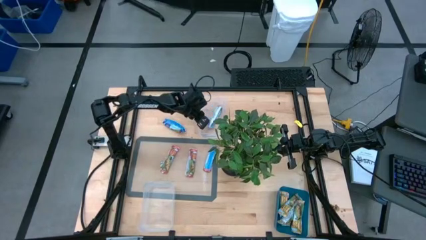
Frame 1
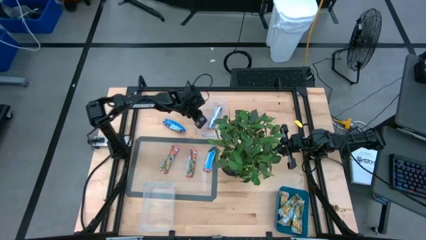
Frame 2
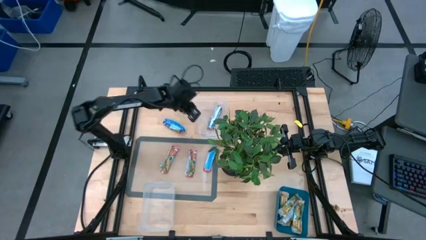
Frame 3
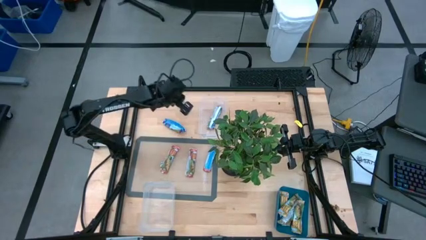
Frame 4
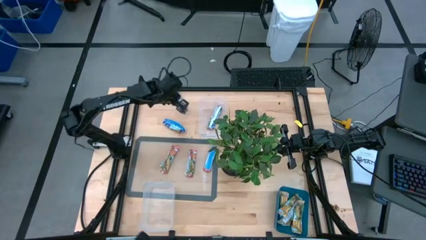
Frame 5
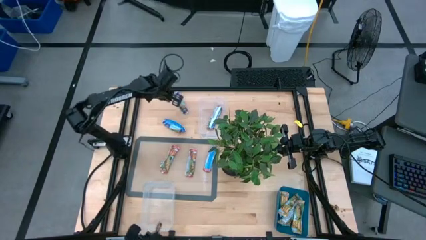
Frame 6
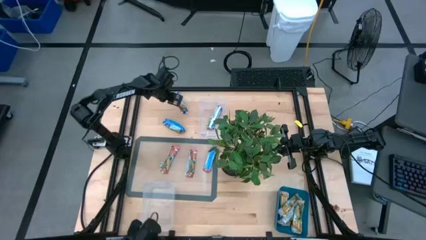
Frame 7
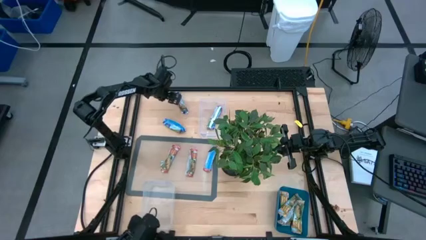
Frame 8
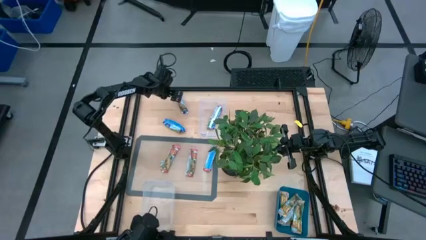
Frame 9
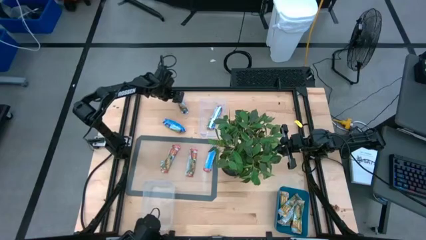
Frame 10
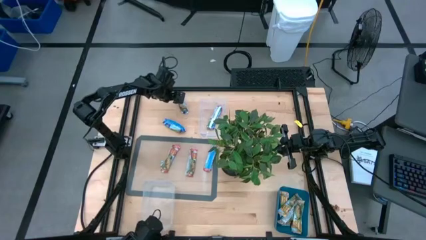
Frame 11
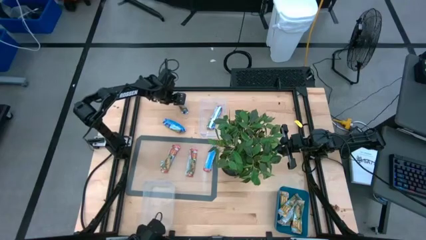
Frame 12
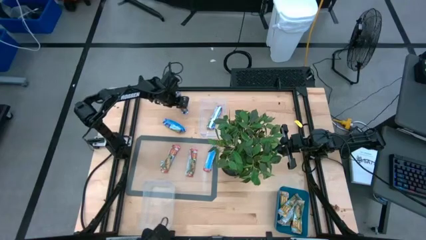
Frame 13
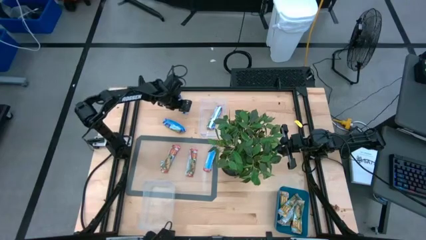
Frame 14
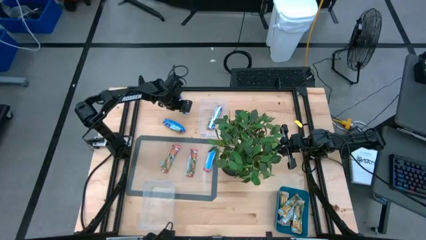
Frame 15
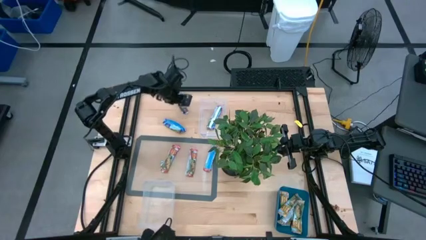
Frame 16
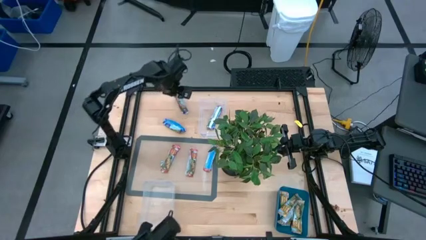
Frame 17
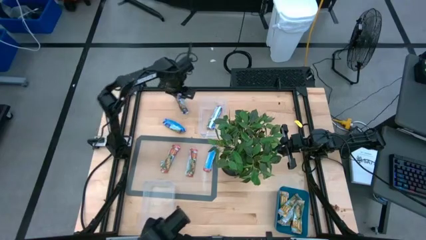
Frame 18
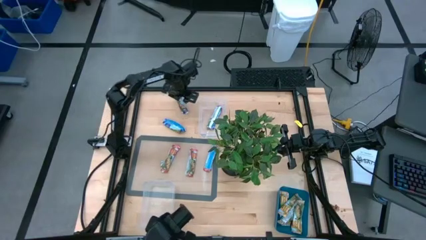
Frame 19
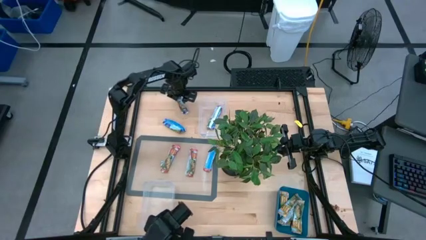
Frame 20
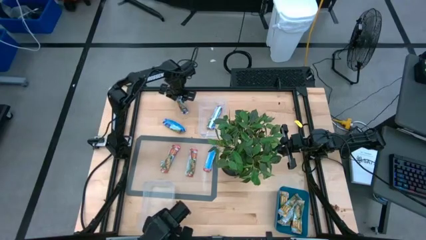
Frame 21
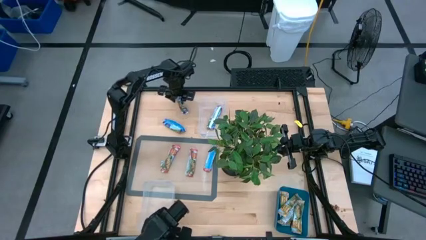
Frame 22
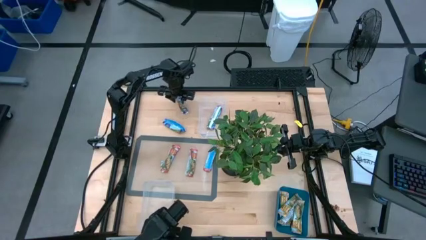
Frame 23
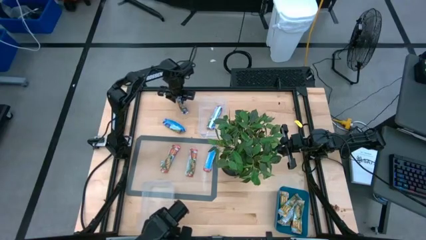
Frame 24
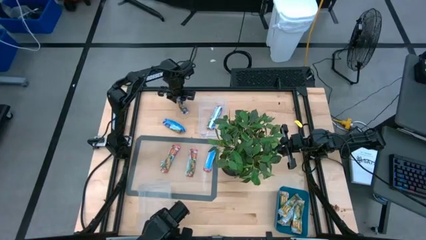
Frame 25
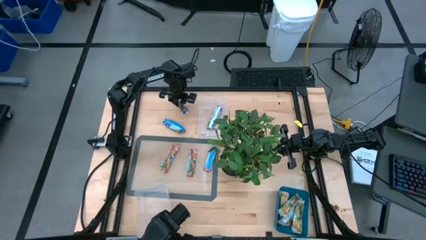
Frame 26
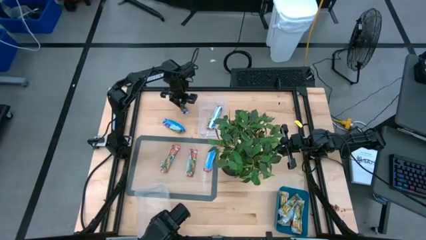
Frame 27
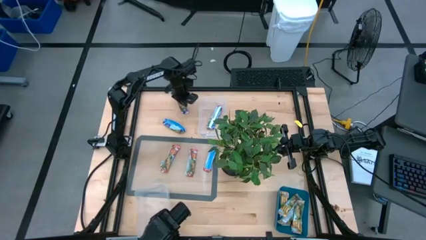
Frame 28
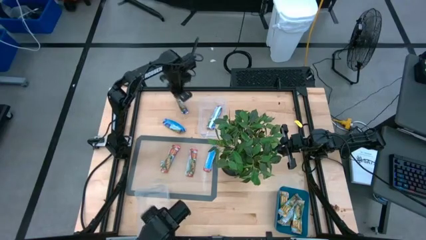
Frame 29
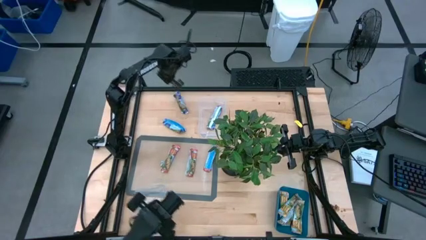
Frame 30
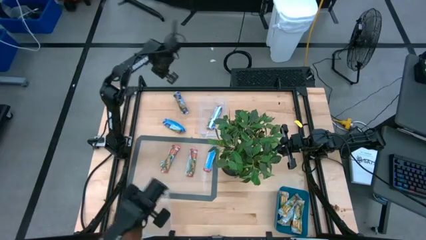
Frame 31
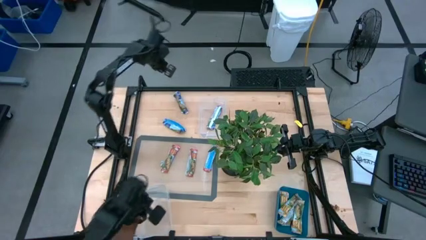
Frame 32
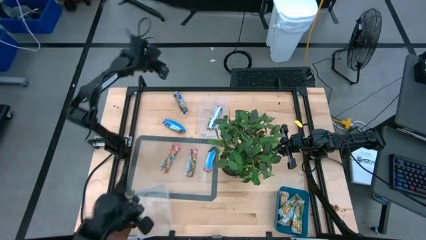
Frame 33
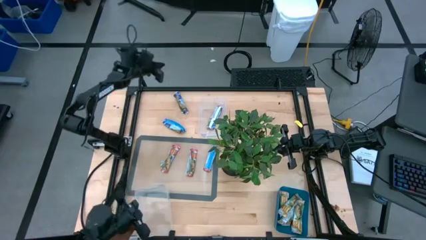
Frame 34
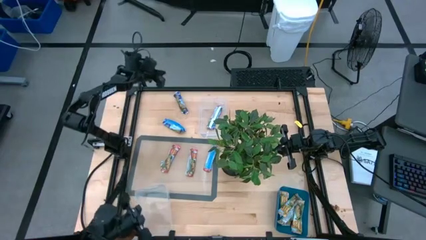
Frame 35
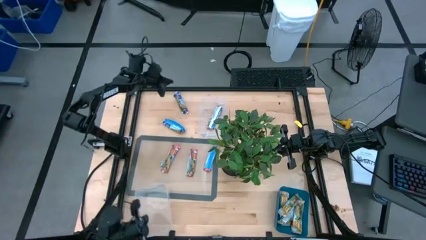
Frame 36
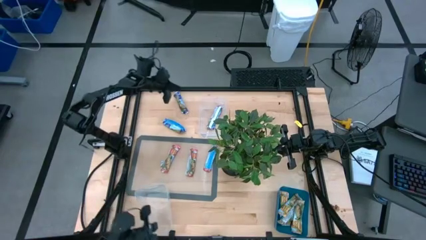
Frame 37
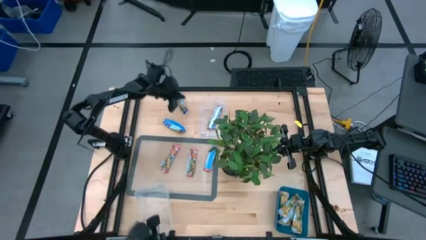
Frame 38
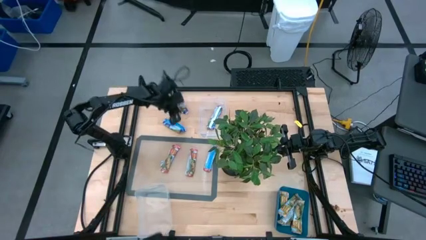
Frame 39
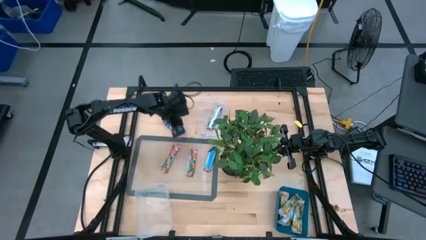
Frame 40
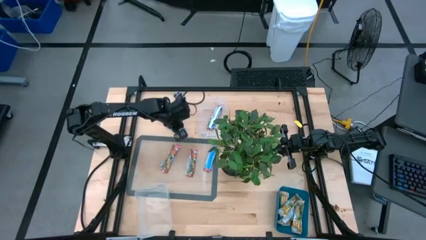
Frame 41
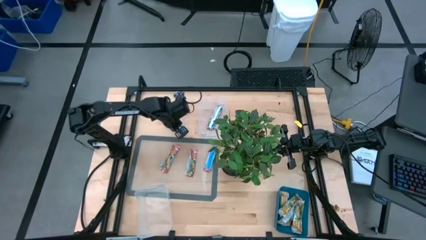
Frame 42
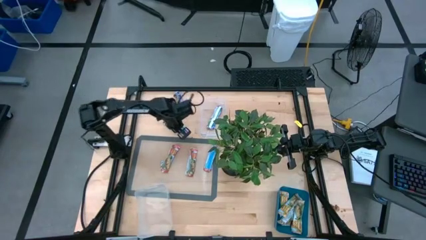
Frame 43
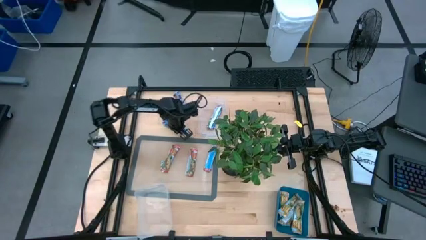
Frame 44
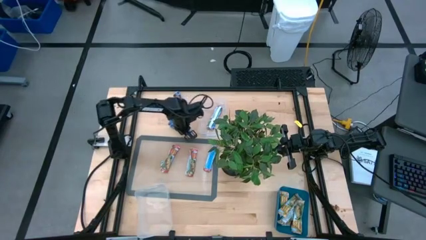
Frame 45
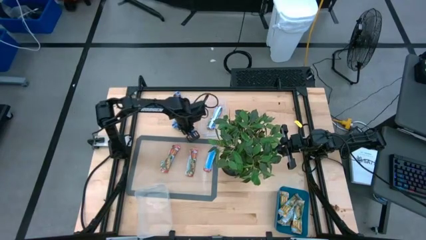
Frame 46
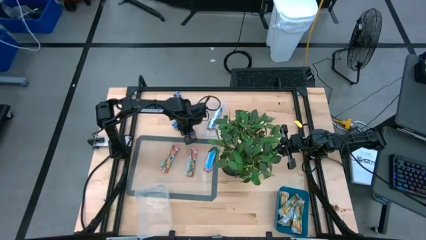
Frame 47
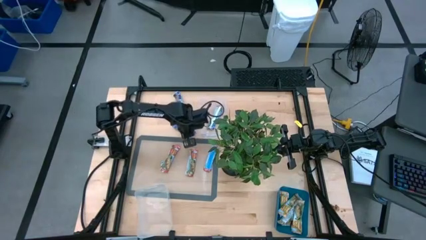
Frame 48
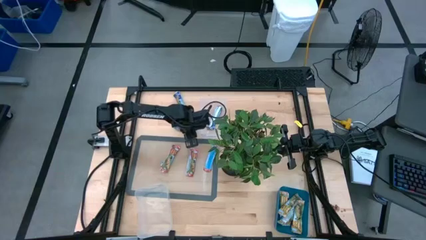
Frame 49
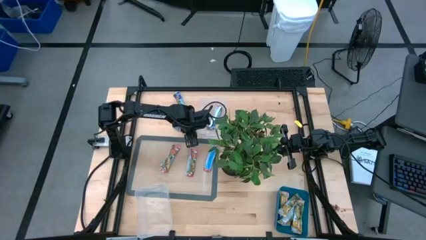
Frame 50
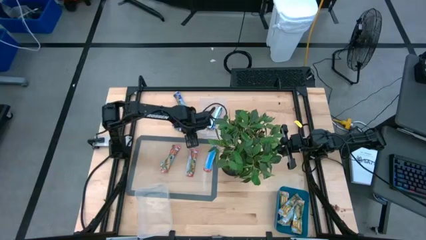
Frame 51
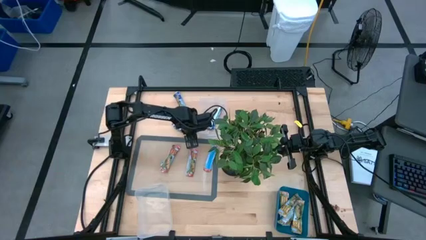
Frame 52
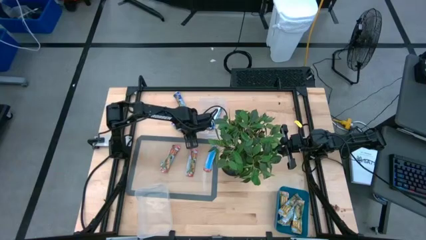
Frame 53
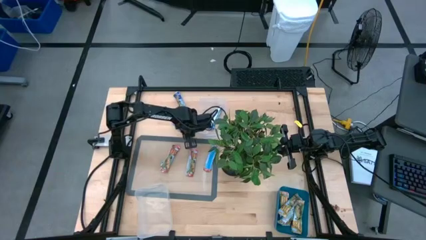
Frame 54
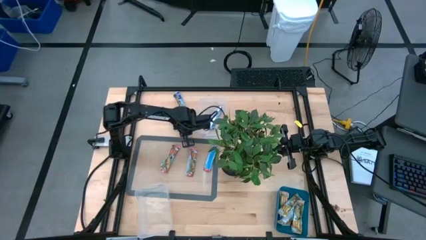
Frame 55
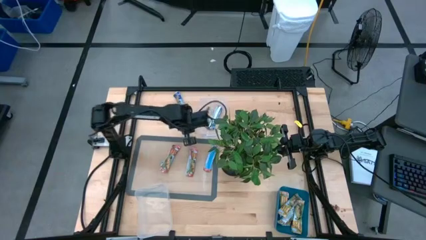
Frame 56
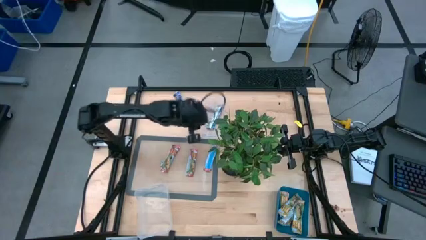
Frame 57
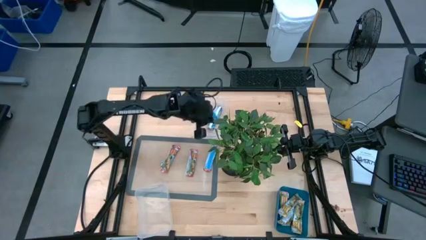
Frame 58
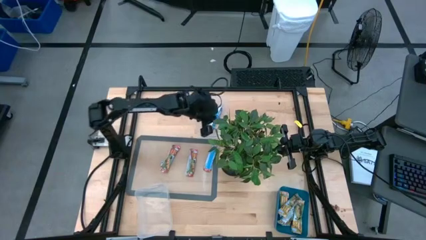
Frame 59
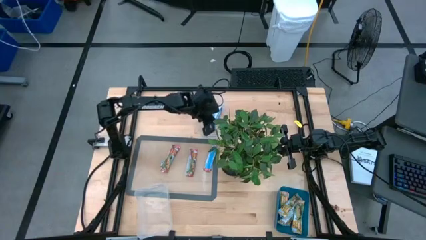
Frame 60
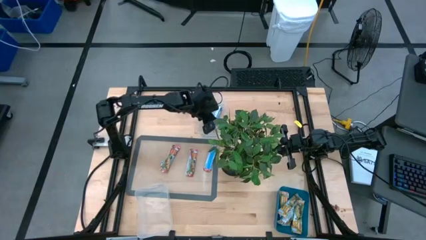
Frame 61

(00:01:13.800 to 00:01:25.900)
Task: Pick and place Granola Bars by type
Put the top blue granola bar into the top transparent bin

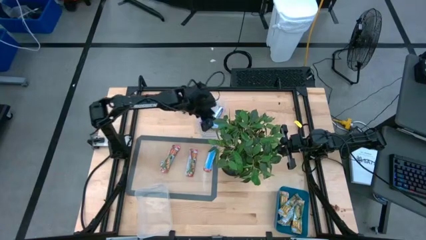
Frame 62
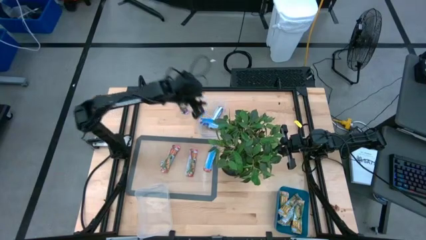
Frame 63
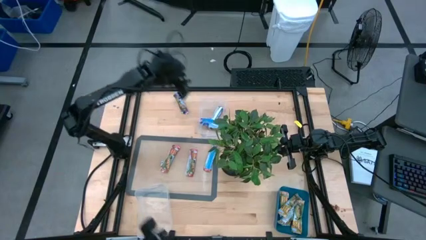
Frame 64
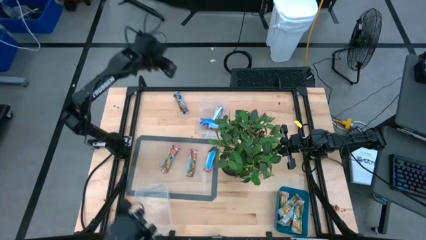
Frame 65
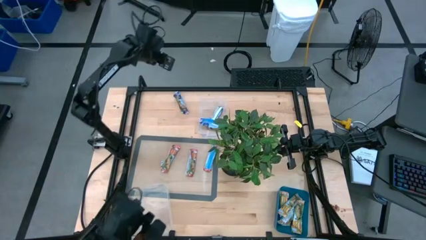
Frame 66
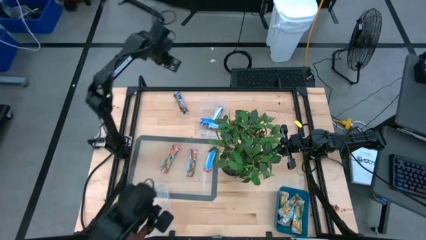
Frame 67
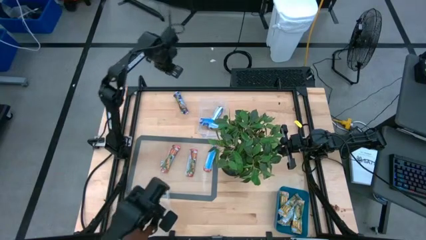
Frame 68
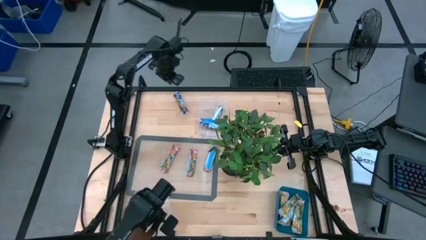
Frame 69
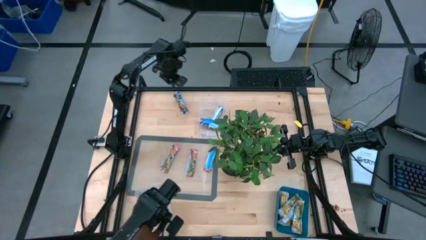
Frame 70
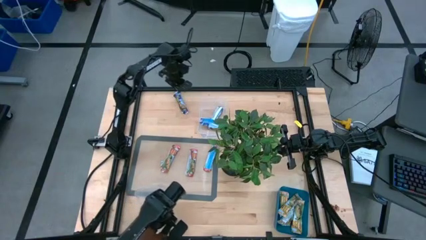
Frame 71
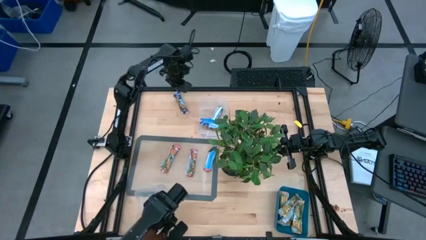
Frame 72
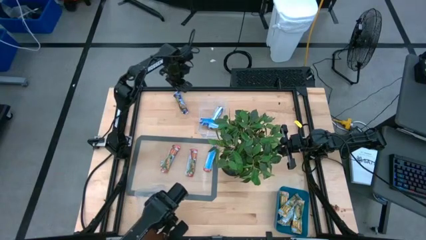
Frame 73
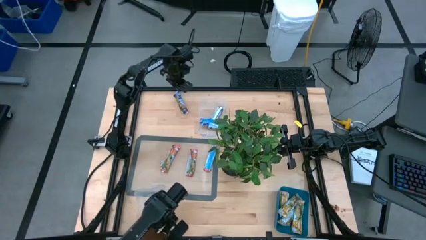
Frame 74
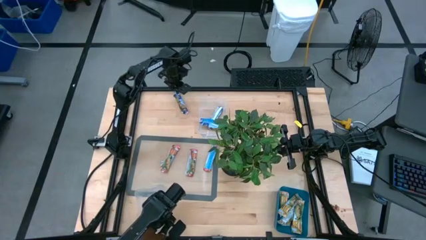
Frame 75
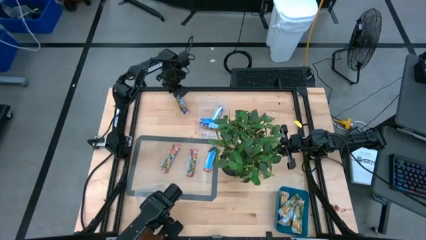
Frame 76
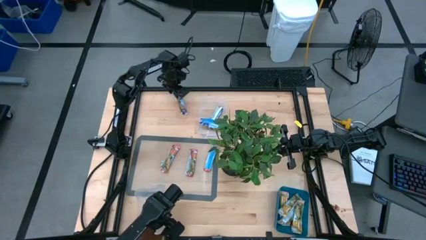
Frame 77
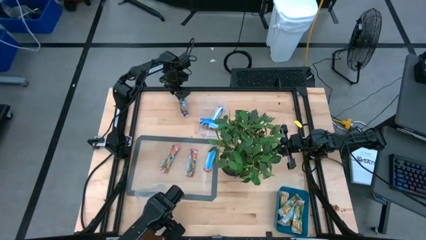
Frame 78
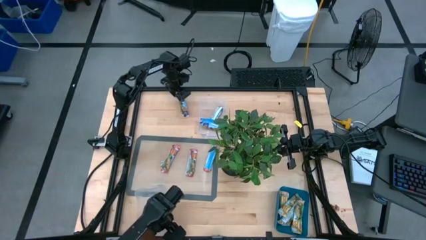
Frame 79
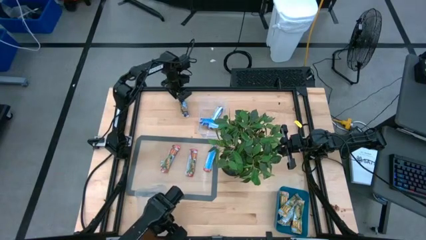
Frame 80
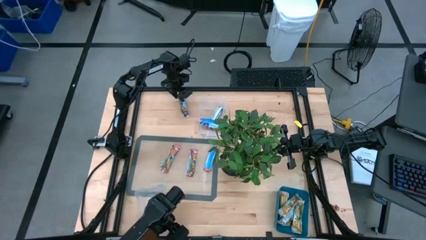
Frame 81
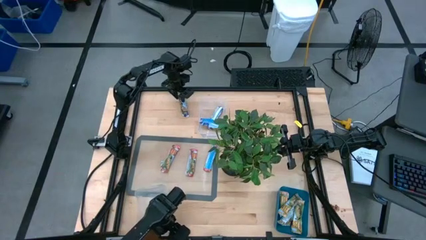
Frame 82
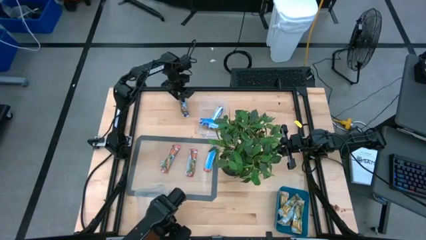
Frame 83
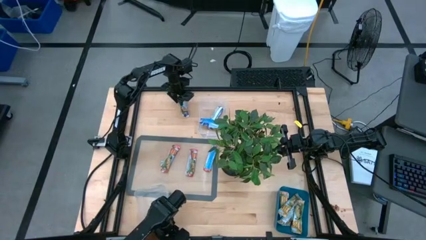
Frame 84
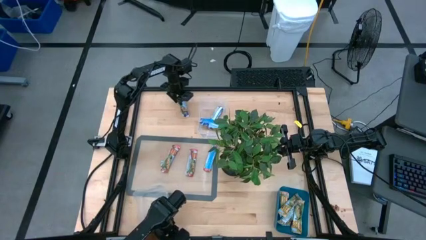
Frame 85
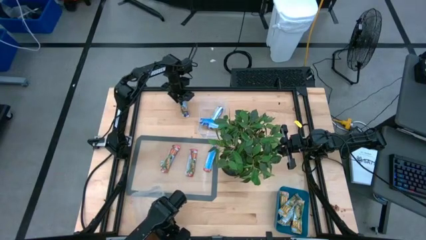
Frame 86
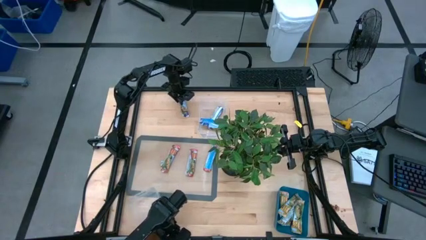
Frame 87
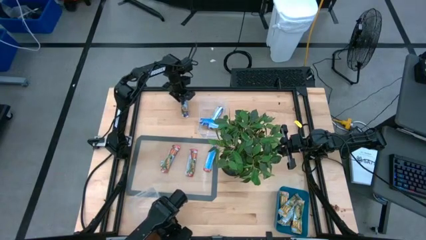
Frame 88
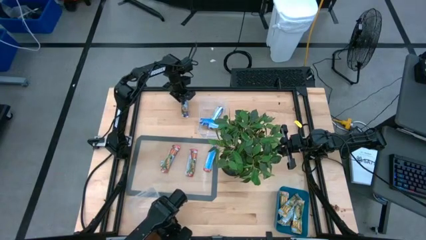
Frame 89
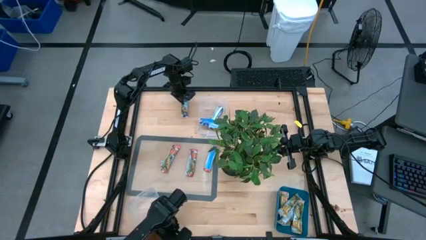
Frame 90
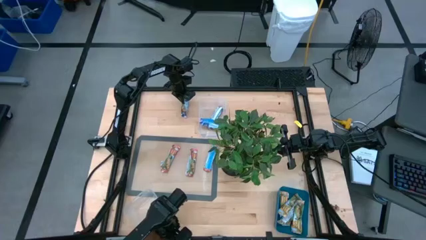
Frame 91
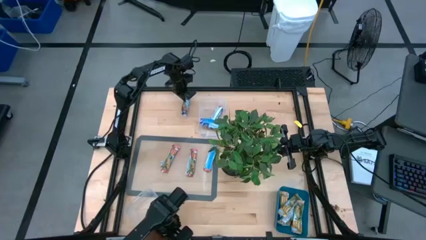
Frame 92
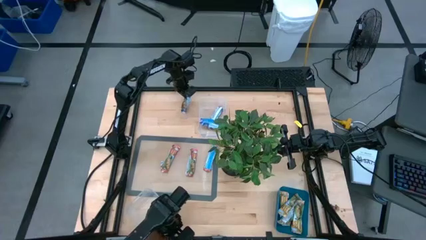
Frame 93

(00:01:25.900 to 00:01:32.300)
Put the blue candy into the top transparent bin
